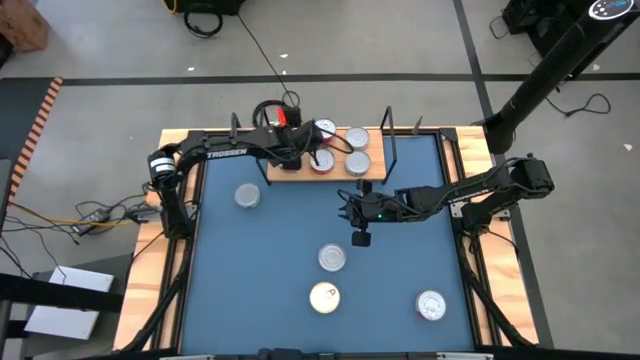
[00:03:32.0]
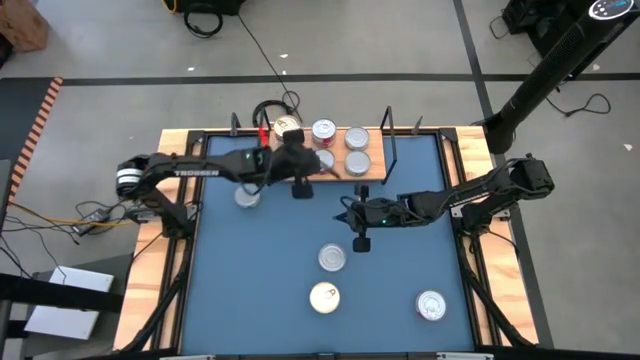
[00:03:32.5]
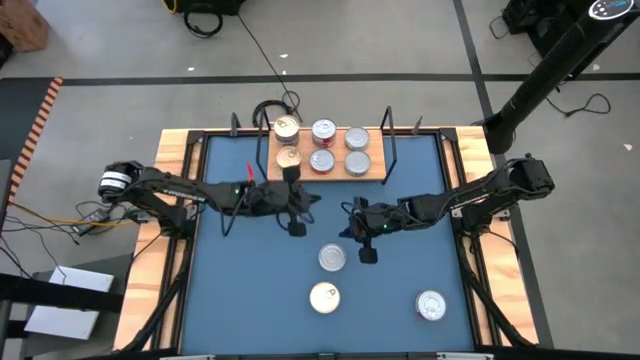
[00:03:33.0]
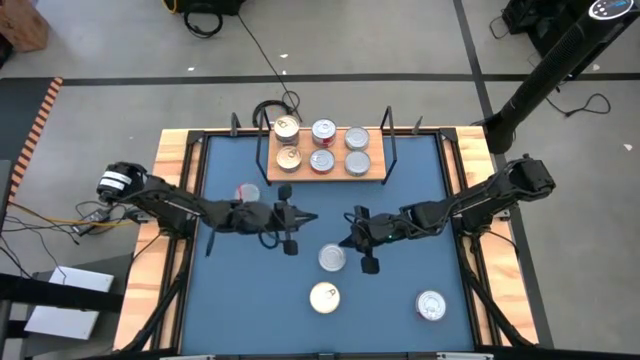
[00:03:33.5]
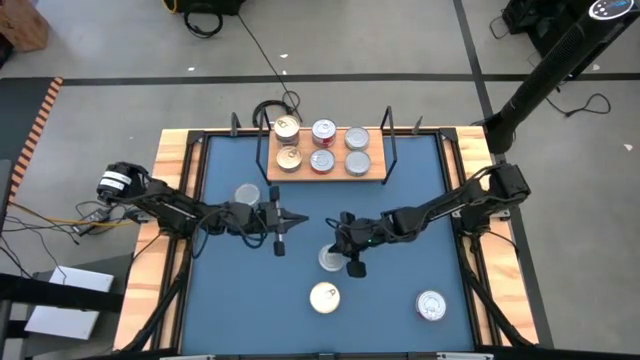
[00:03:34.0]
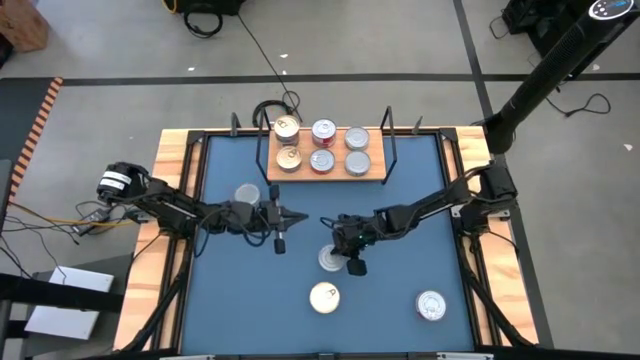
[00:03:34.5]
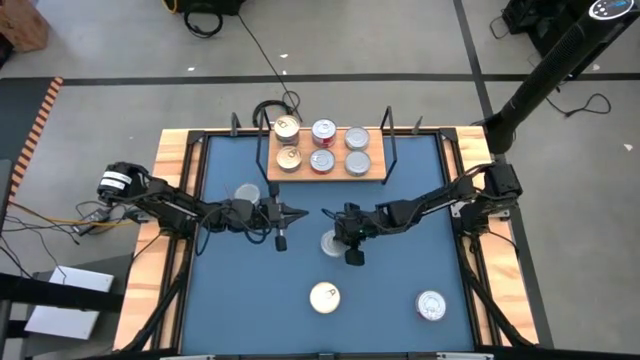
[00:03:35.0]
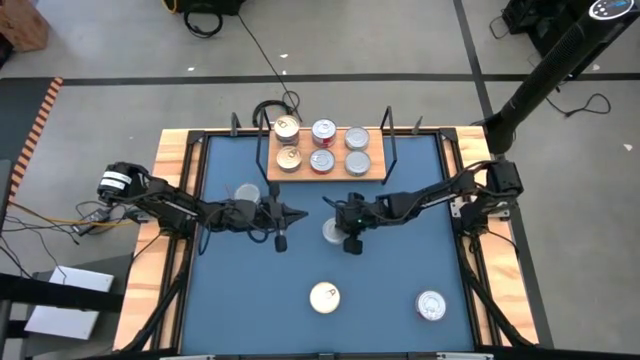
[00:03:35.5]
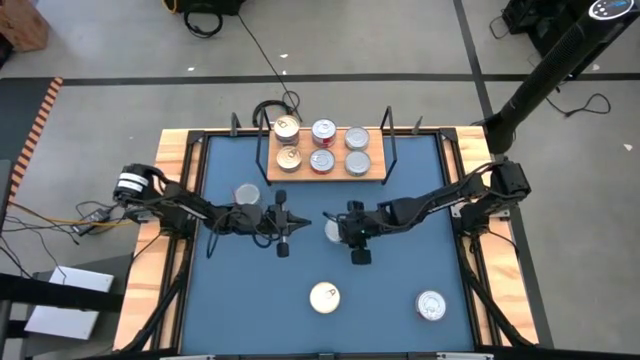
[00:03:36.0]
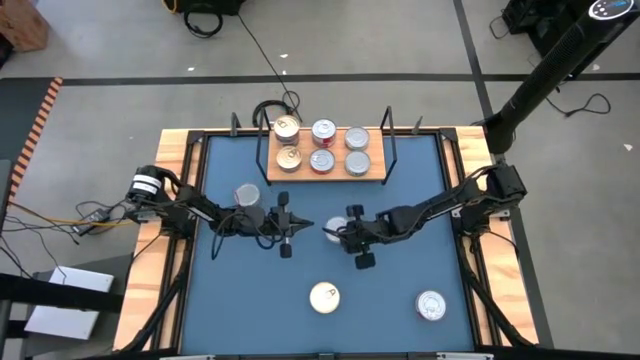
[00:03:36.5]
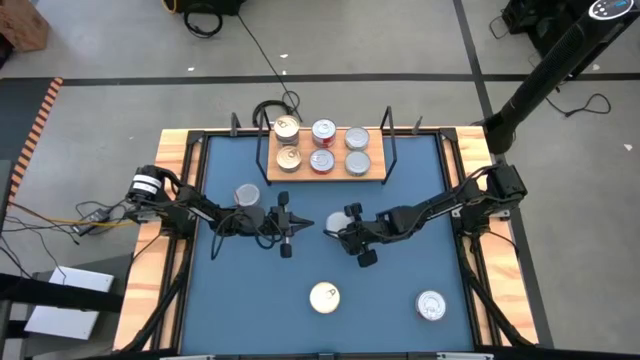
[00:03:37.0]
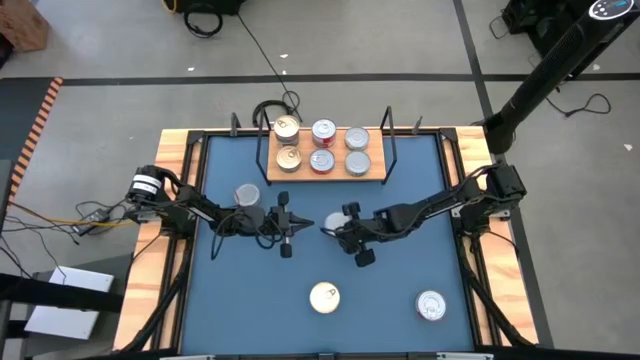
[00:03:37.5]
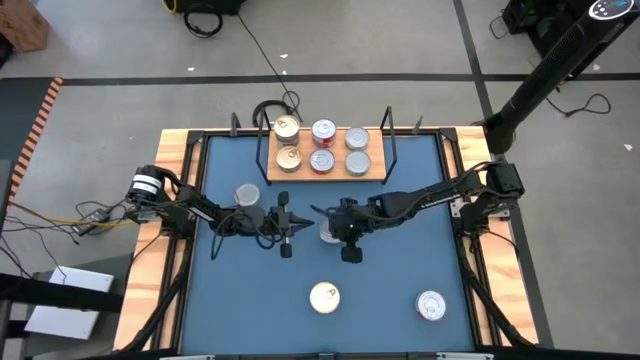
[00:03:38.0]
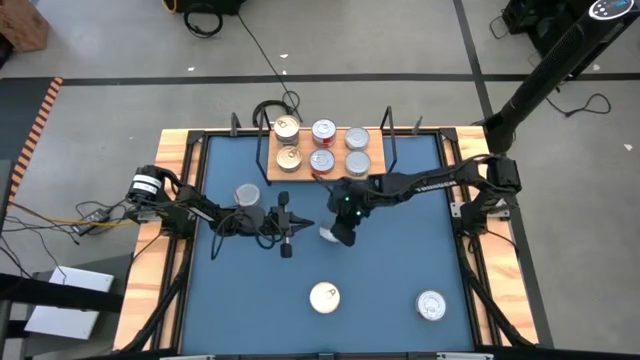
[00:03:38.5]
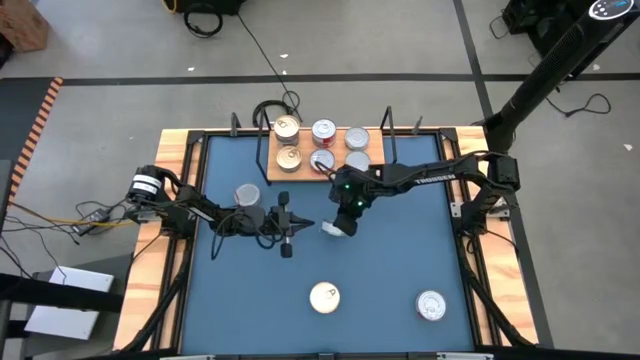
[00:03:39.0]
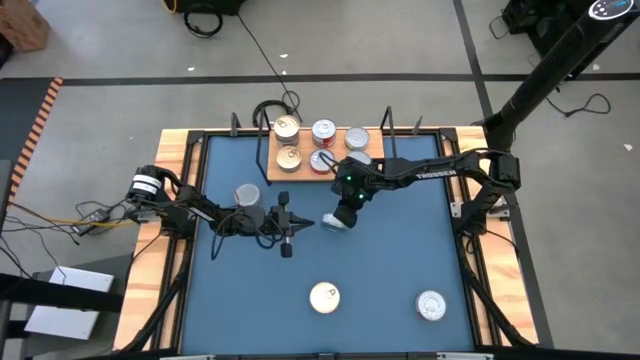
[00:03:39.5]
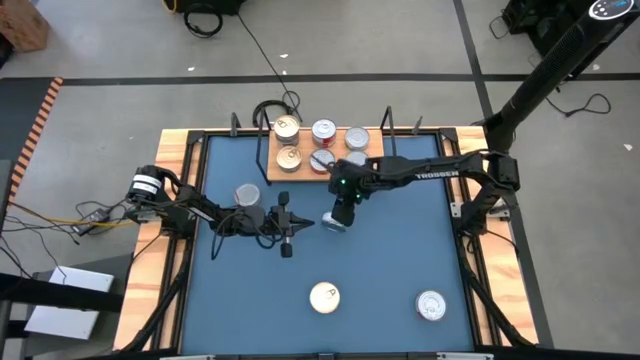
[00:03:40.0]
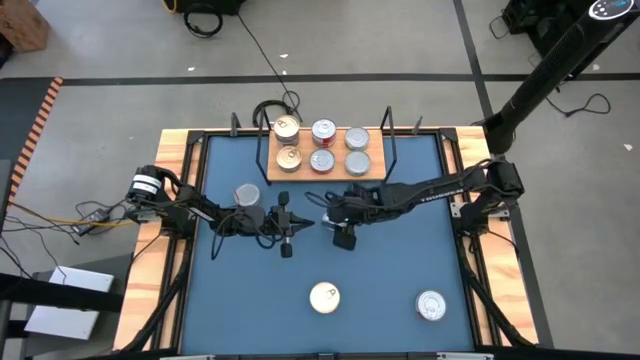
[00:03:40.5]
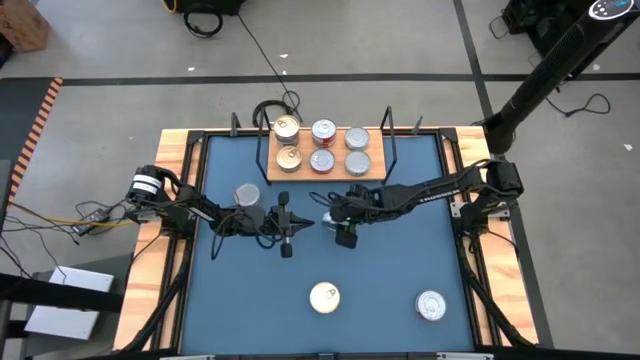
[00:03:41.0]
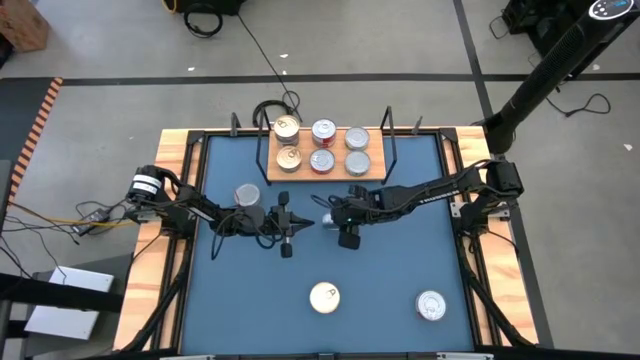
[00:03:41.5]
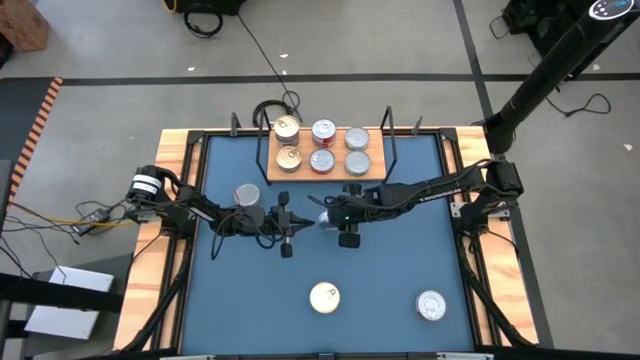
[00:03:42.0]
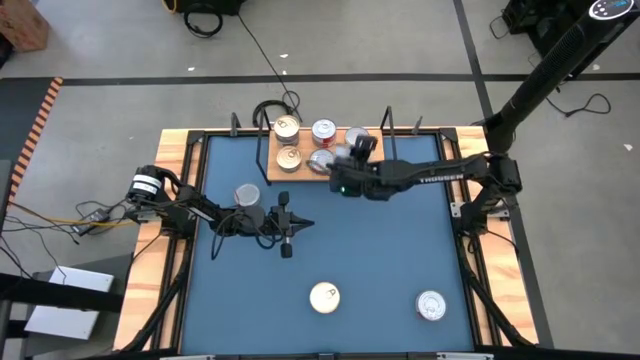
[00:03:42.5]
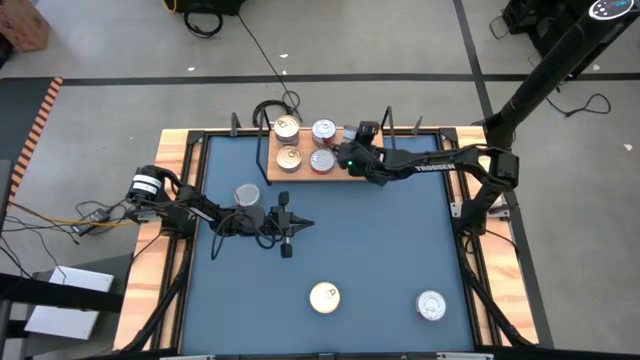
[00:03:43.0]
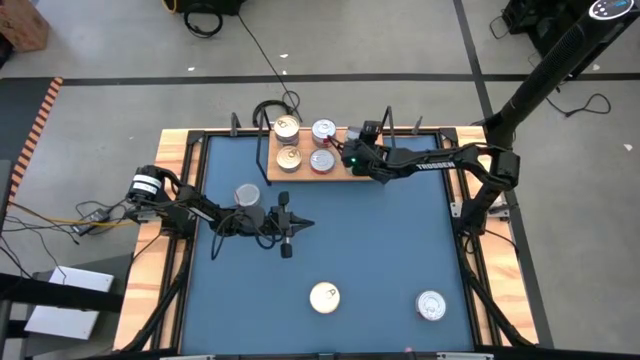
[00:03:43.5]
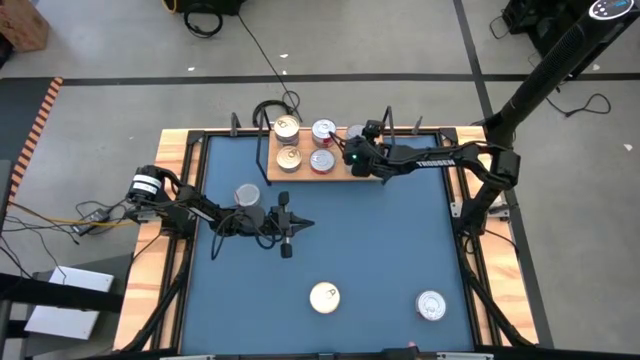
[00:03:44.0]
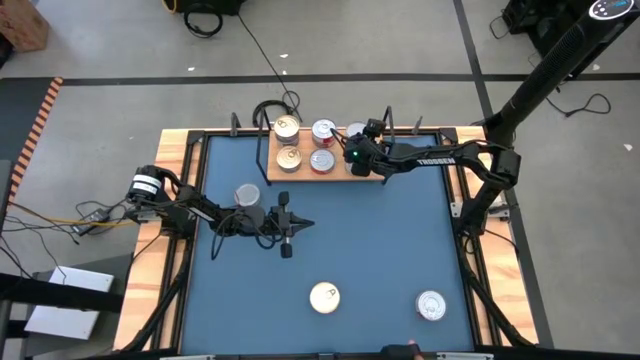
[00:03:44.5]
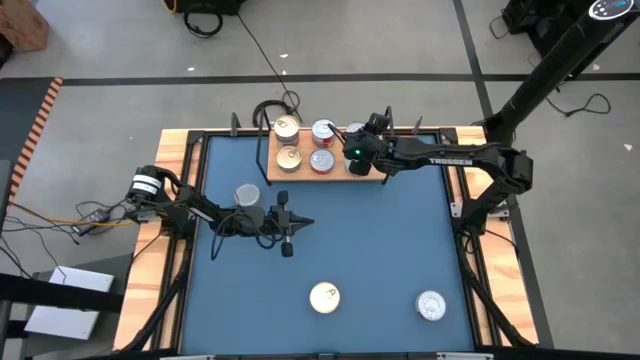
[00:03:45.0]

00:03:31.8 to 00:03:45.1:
Task: Stack canned seafood by type on shelf
Stack the right white tuna can on the top white tuna can on the shelf

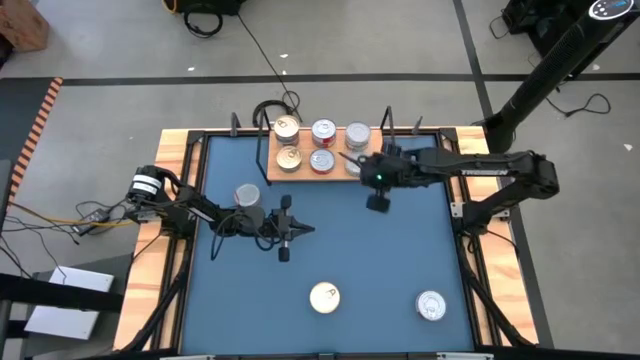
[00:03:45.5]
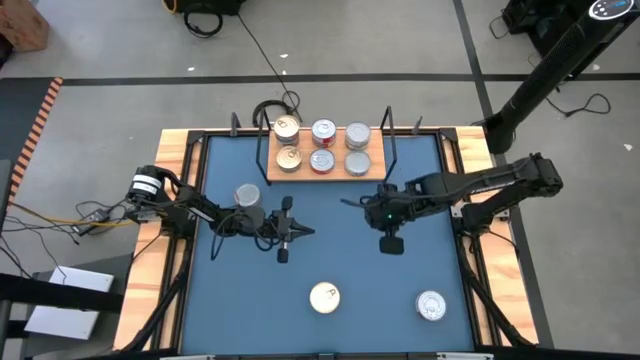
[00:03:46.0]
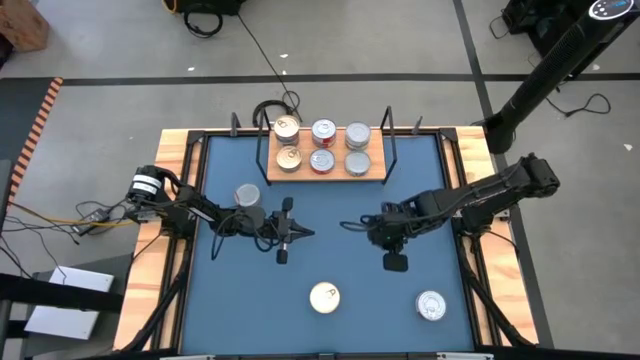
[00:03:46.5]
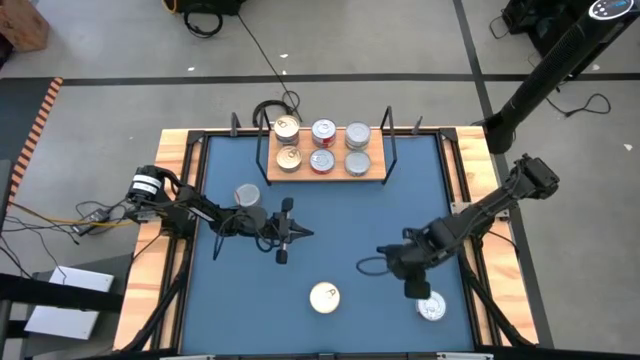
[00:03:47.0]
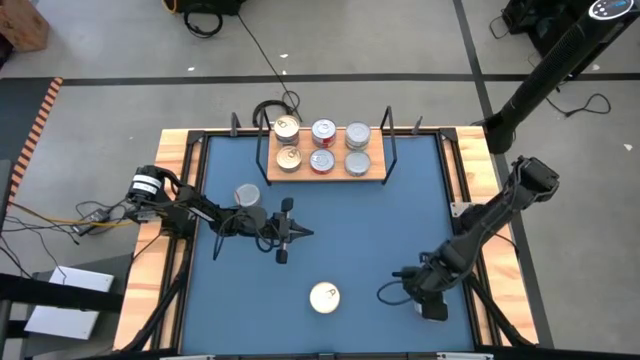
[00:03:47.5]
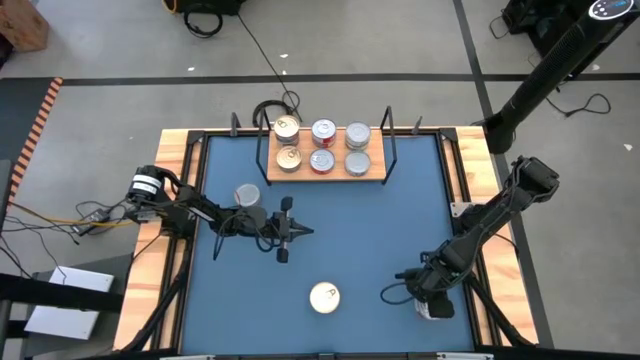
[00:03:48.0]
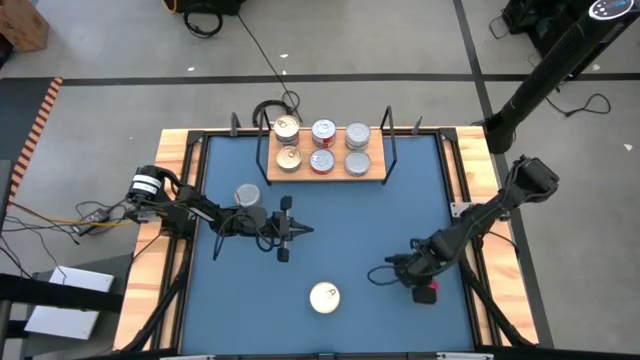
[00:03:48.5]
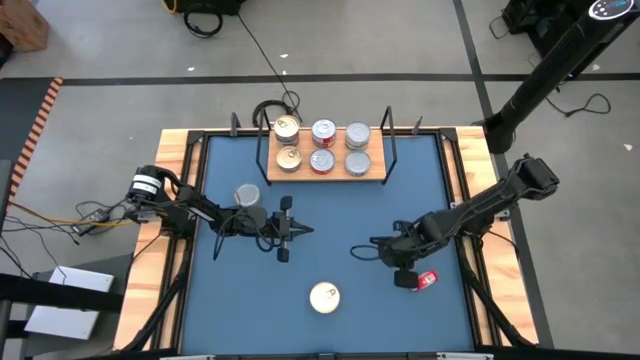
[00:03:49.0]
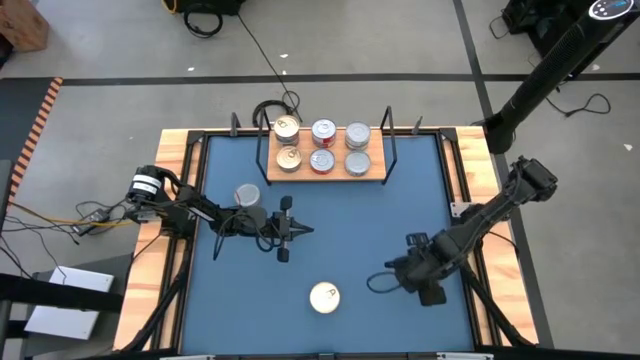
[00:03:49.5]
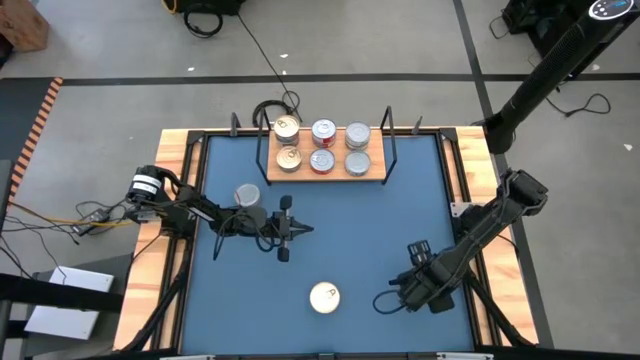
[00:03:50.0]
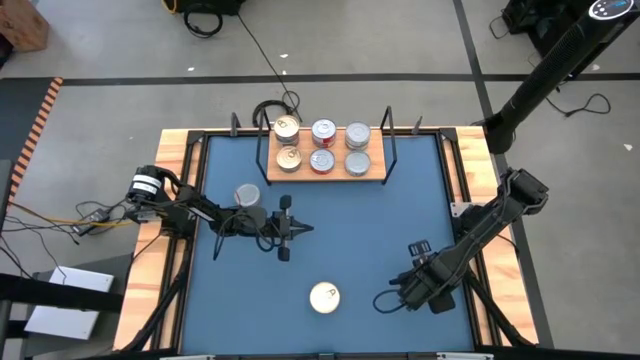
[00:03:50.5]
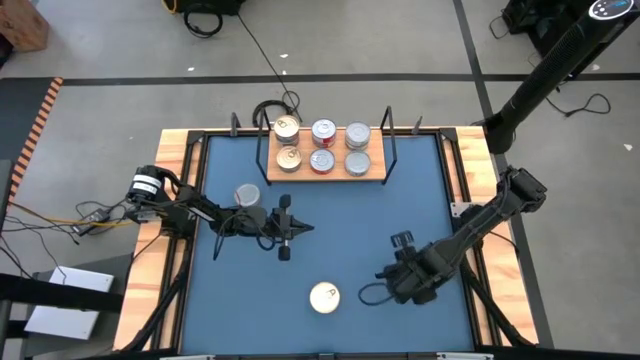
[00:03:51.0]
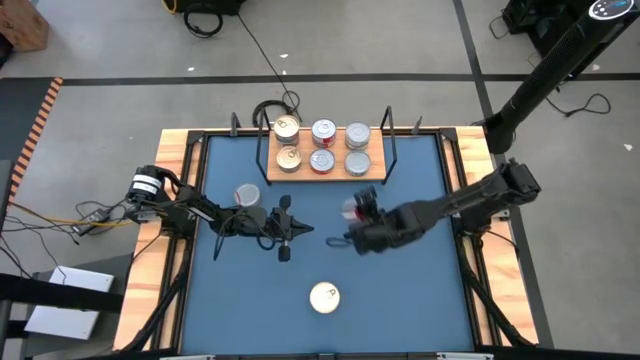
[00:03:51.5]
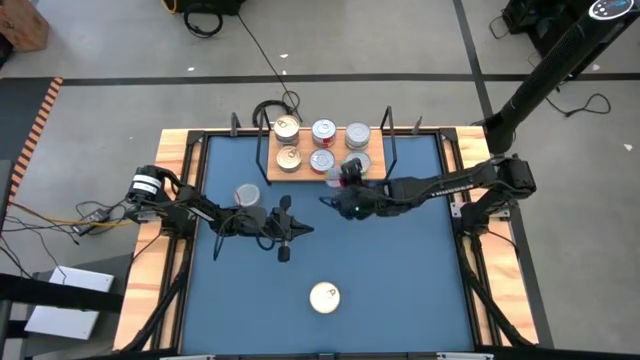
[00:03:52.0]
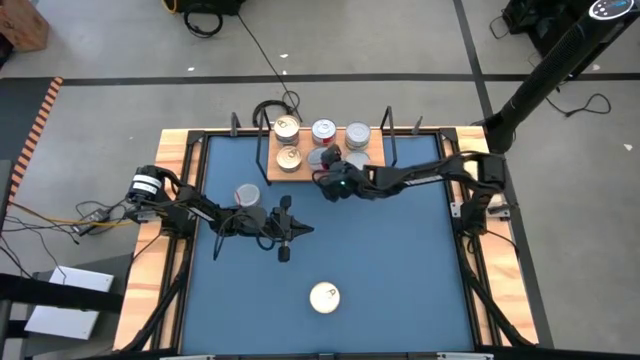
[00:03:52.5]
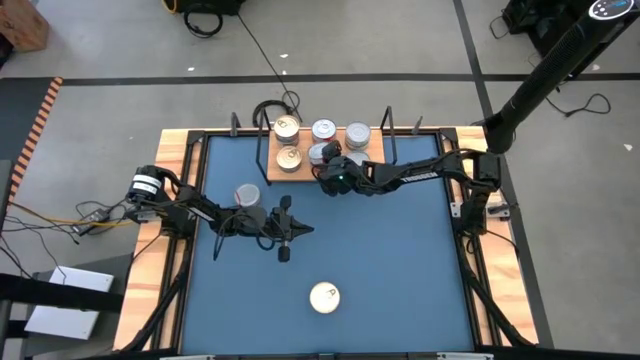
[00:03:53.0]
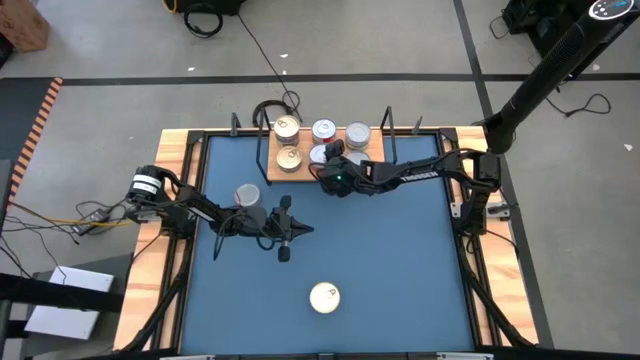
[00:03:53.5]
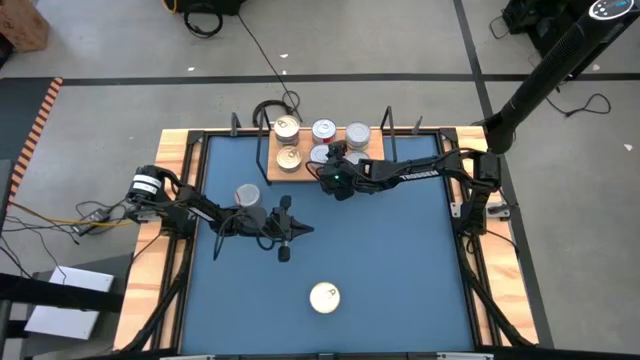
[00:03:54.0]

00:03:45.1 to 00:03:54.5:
Stack the red tuna can on the bottom red tuna can on the shelf
